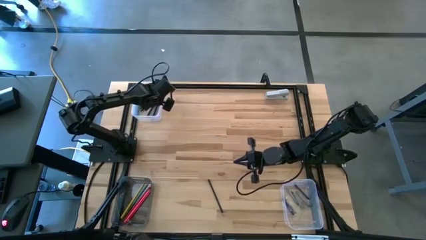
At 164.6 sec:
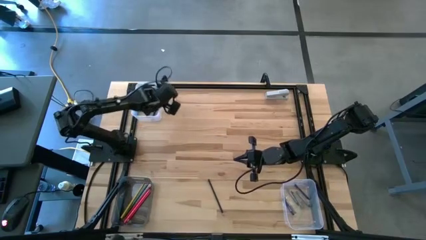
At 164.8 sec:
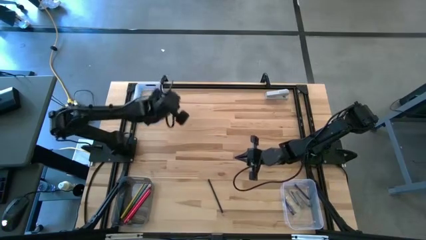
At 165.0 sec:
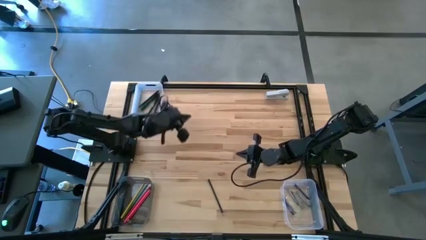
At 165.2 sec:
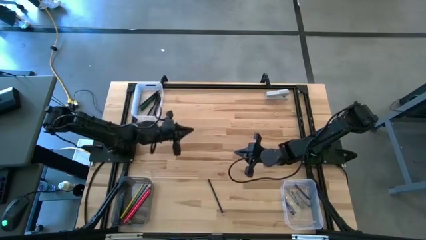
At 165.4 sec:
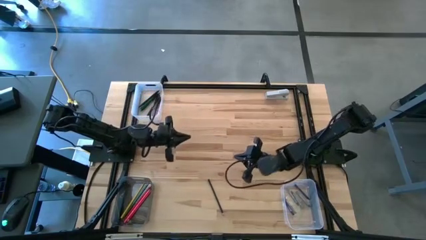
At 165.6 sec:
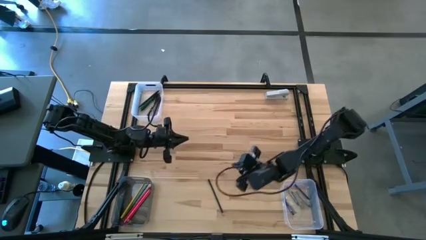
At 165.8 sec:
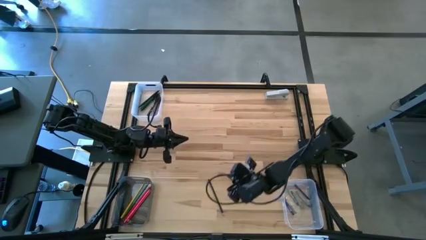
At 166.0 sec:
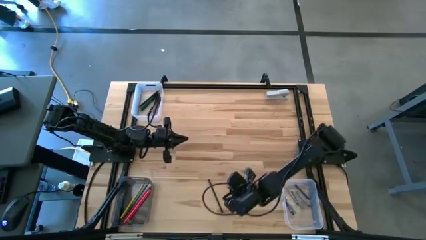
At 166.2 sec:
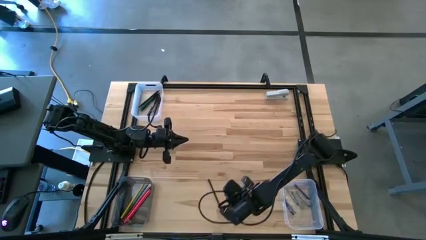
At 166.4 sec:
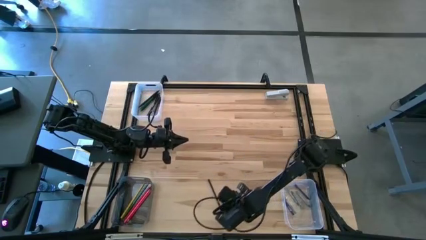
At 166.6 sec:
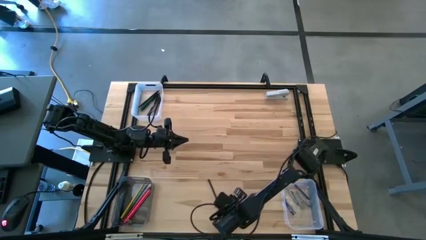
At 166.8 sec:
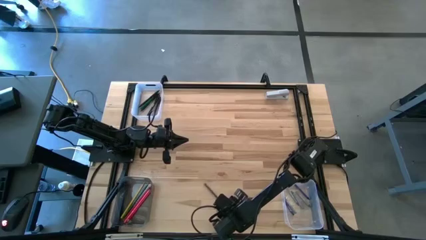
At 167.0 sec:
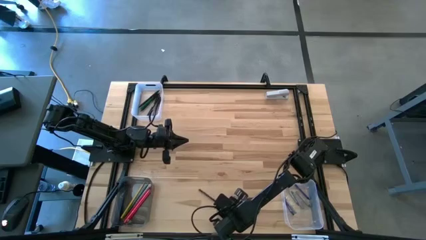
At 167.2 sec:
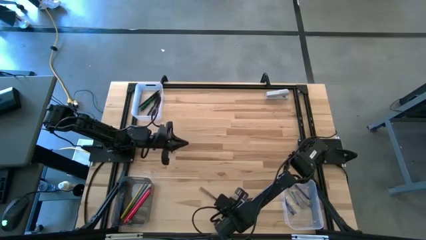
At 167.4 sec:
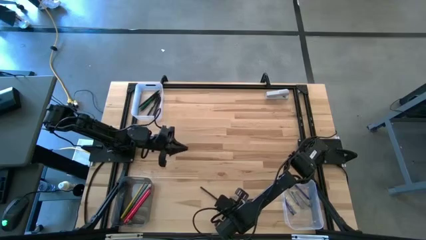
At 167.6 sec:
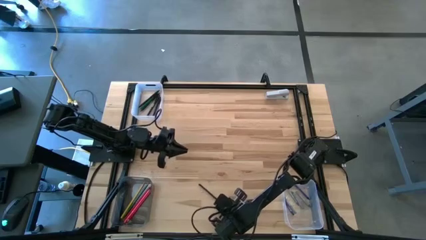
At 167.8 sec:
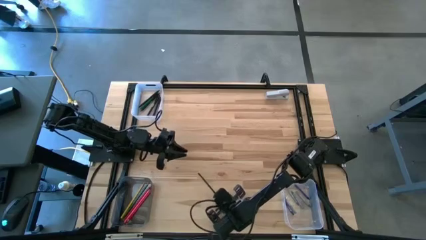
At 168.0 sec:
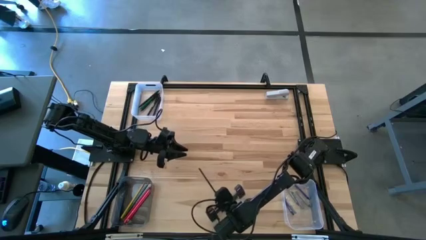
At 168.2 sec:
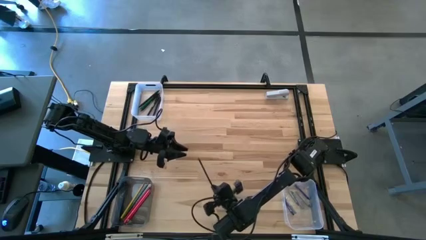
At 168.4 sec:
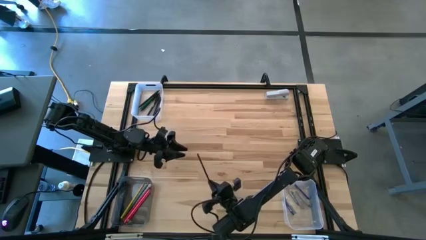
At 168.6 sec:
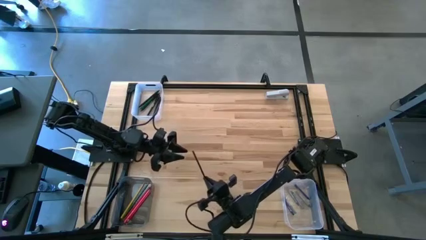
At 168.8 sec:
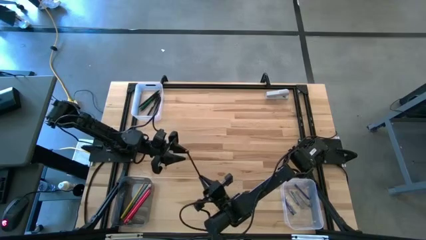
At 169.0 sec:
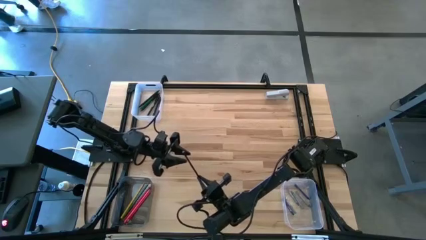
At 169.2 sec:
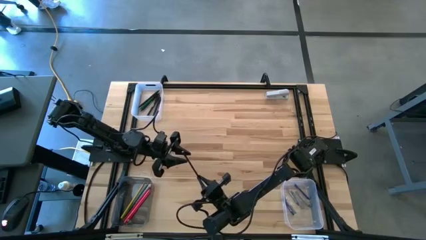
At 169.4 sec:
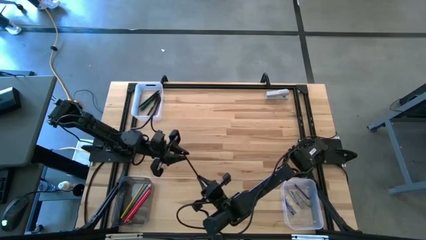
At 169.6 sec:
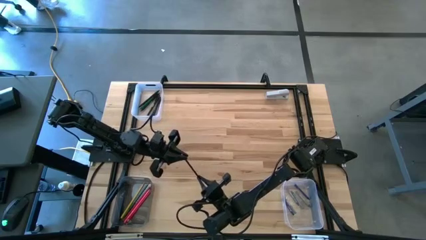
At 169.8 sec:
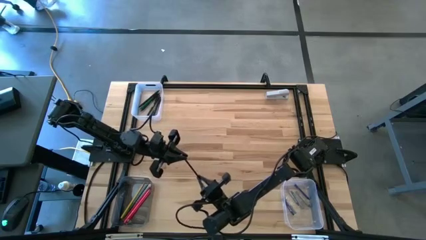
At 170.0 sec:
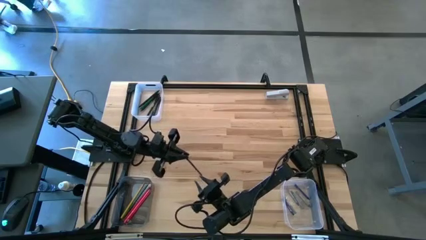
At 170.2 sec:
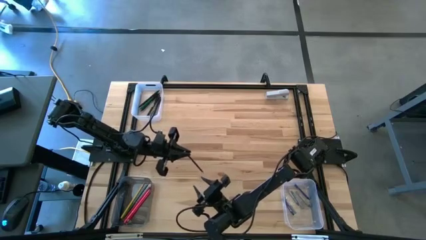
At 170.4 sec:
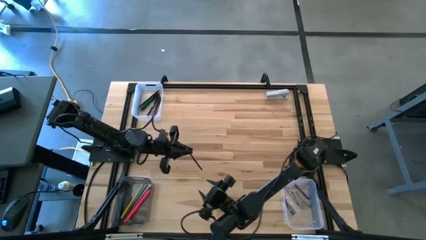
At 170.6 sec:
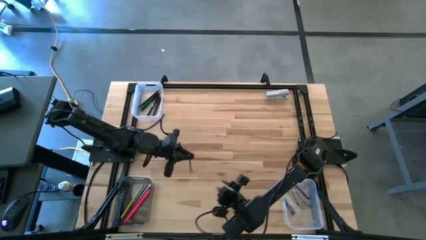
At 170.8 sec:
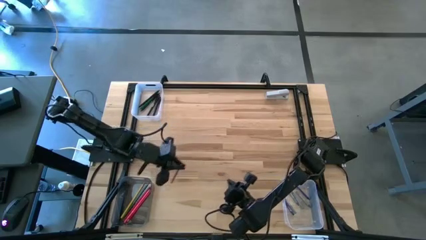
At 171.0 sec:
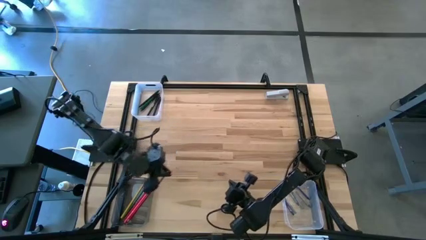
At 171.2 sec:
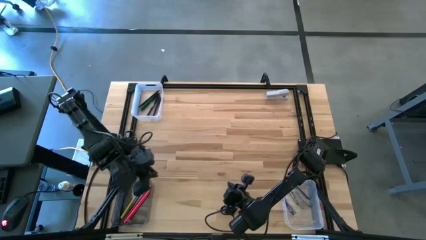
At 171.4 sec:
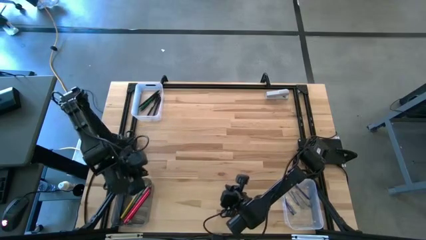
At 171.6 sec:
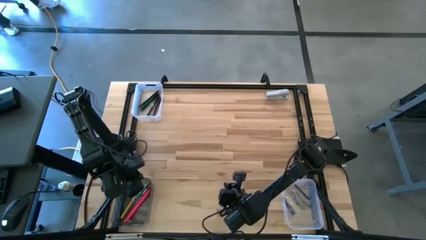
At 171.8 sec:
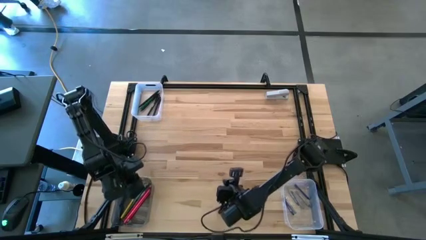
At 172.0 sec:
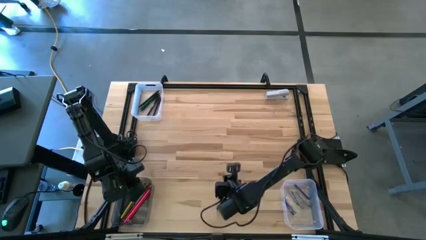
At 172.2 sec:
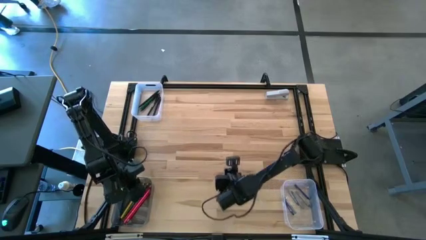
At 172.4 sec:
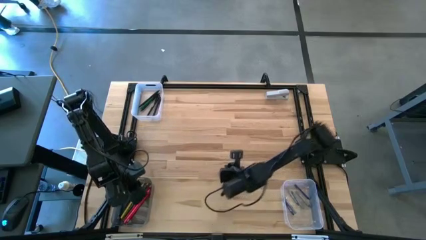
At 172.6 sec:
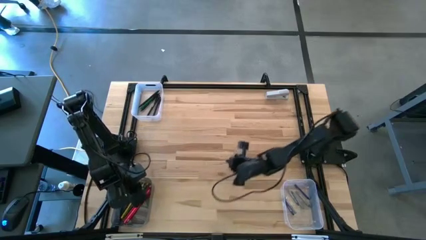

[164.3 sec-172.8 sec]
Task: Sort crayons/erasers/pens/pencils in bins
Put the blue pencil into the black bin

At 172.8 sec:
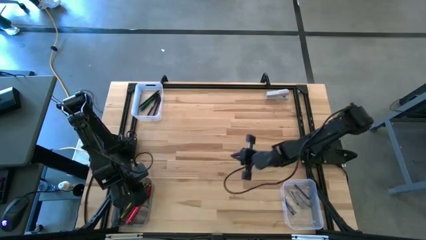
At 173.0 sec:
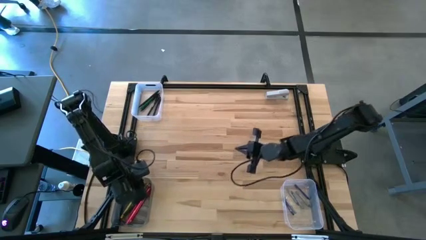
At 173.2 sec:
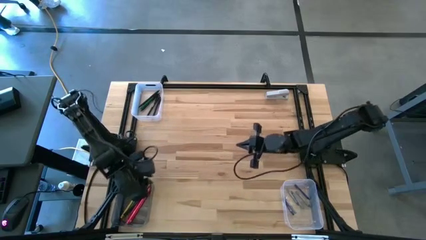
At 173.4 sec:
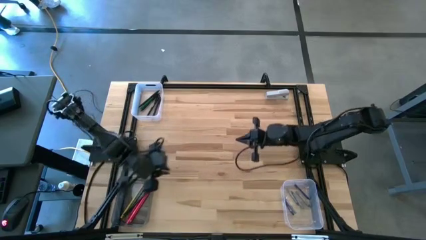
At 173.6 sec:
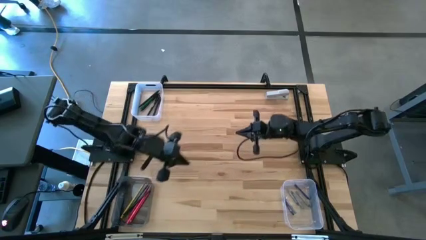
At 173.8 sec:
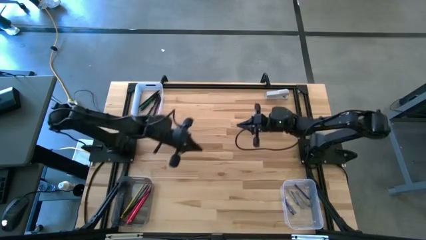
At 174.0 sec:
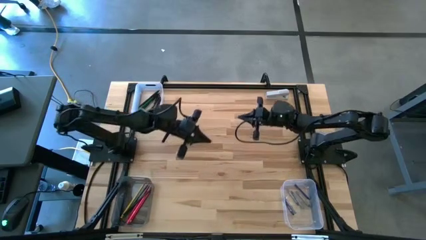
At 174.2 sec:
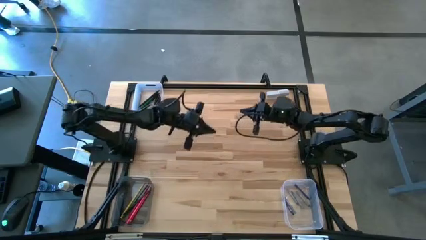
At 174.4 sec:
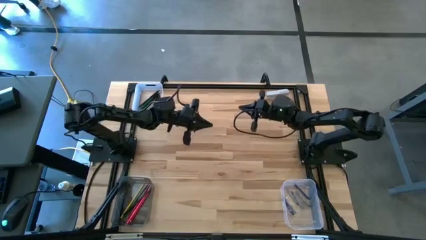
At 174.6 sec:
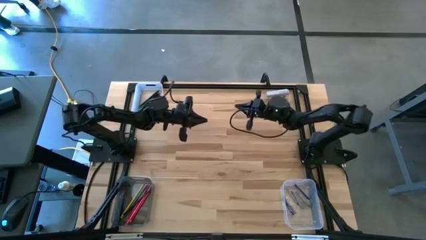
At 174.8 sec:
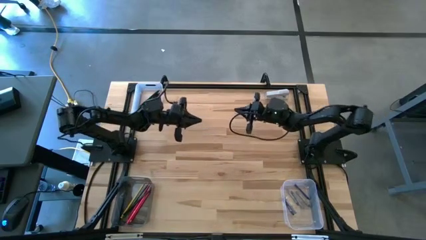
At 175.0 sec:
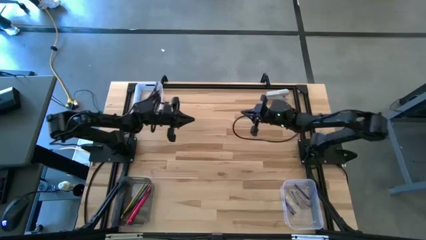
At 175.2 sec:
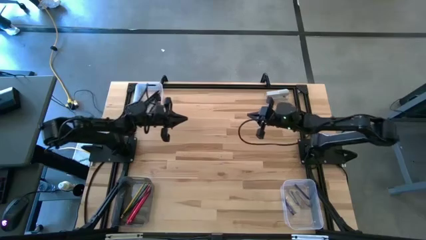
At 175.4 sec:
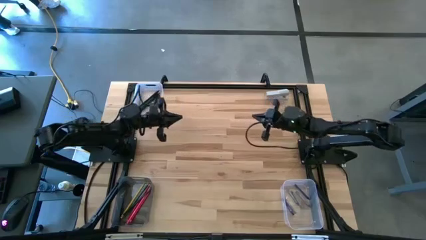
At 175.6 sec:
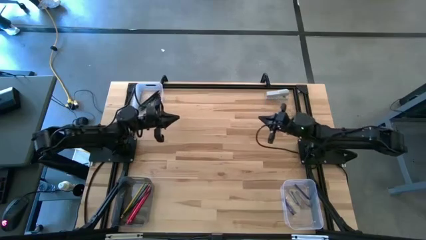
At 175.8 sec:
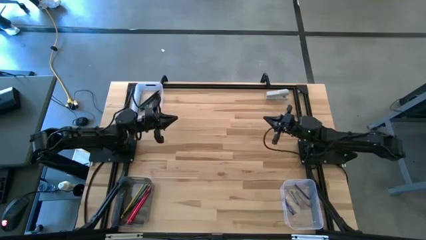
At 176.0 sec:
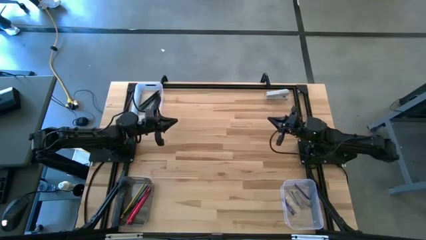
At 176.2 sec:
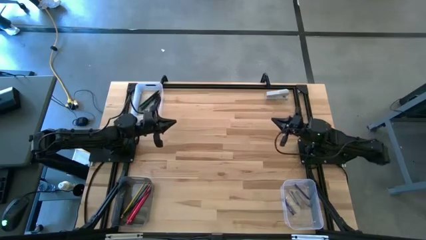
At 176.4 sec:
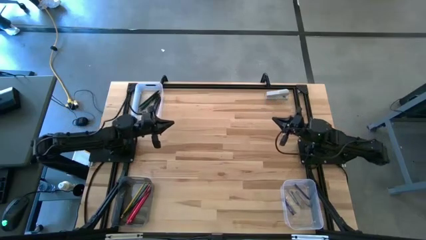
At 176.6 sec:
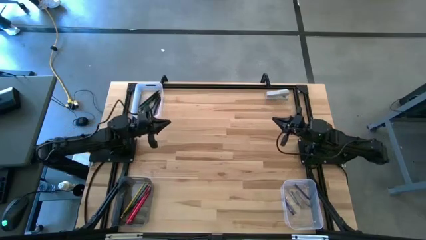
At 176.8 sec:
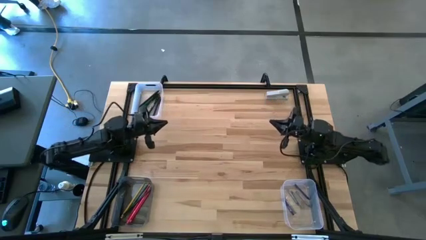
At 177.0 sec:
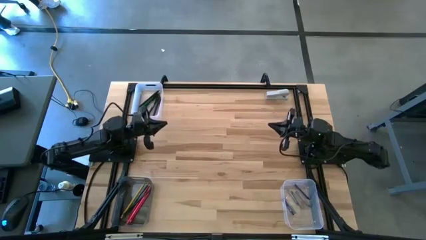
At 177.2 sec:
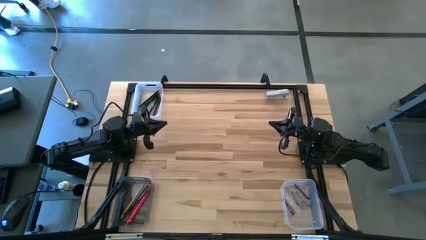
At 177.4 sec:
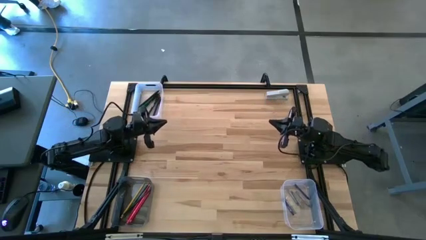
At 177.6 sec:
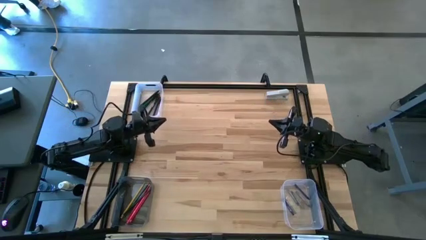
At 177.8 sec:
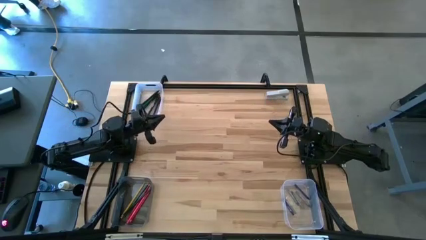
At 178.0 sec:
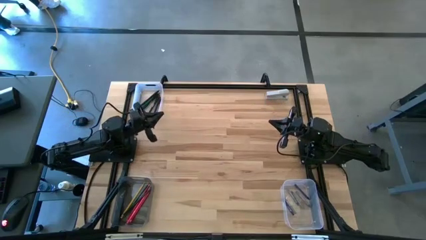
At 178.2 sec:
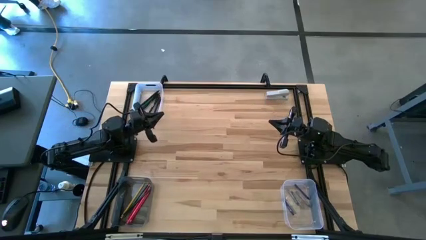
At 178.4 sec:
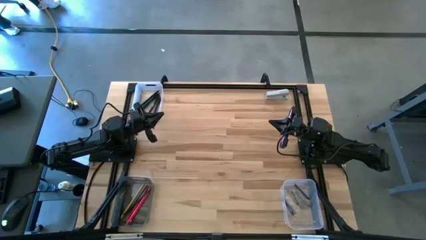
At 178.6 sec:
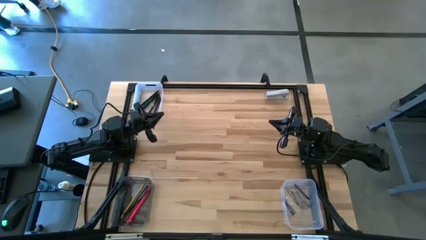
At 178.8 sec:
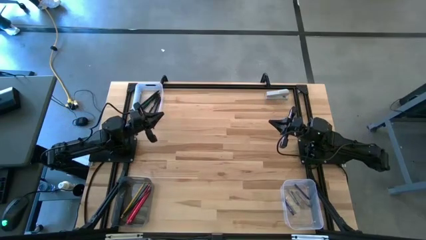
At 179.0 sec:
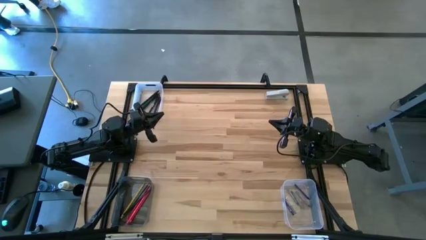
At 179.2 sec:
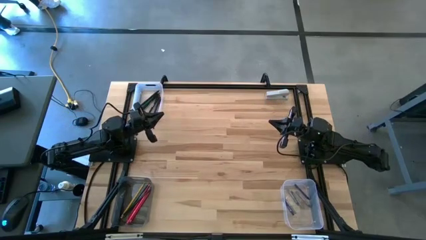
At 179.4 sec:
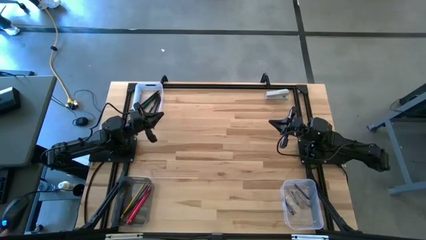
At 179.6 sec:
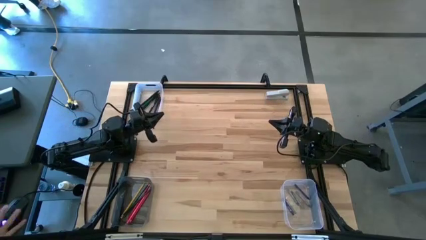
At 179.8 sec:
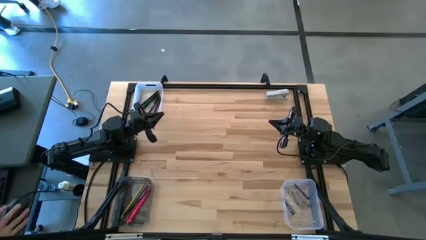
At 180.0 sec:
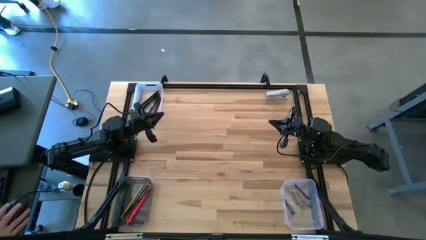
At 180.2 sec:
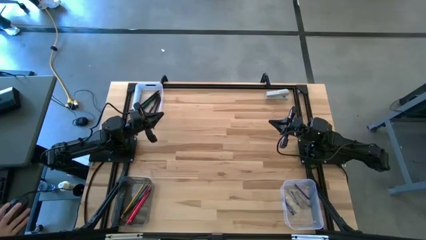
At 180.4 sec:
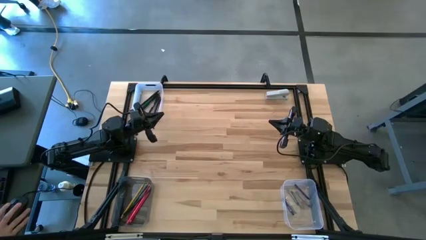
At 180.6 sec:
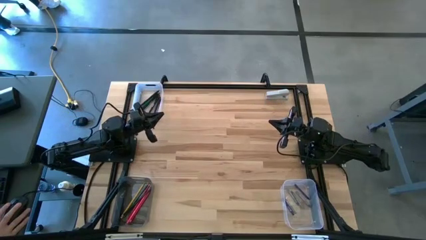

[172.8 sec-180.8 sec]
Return to Home Position
